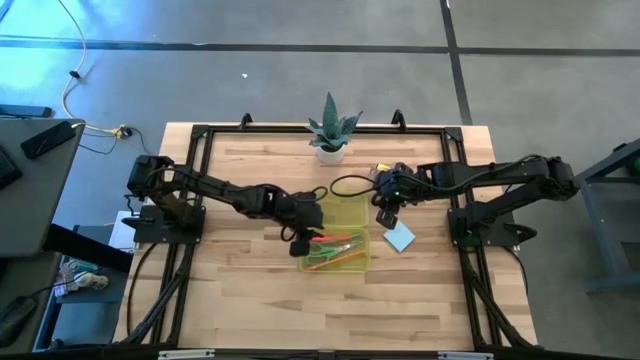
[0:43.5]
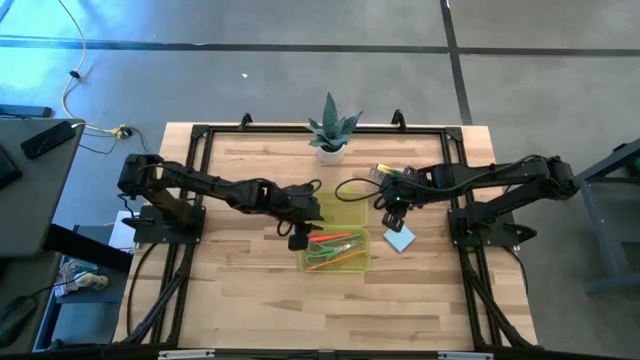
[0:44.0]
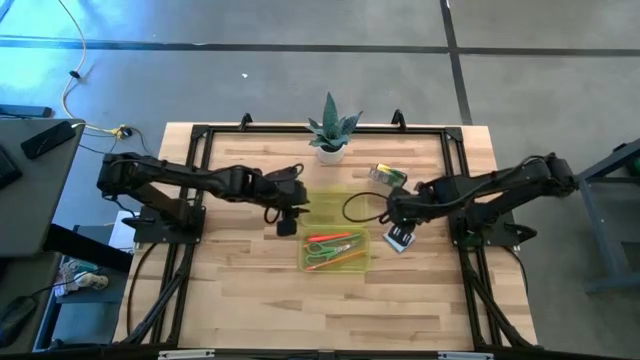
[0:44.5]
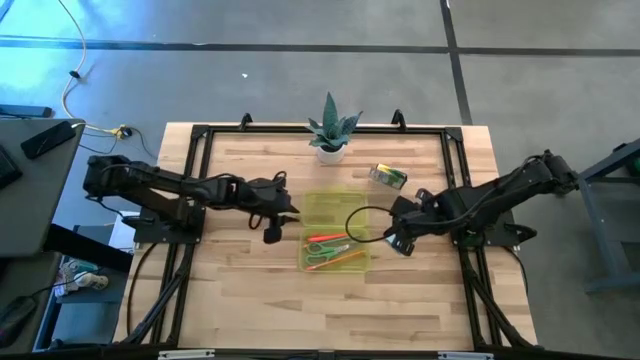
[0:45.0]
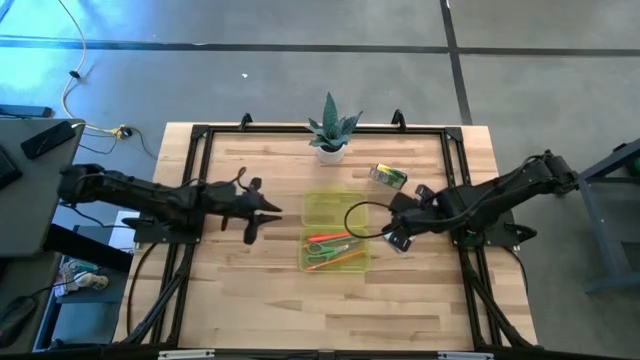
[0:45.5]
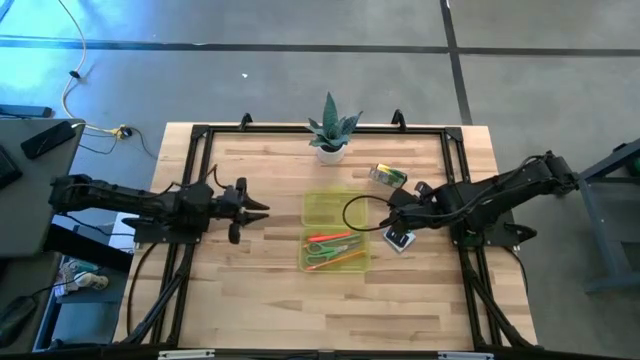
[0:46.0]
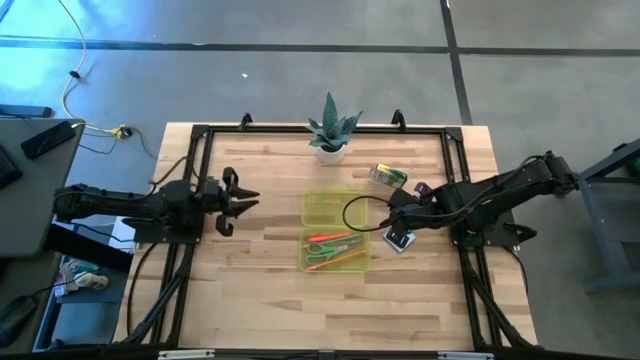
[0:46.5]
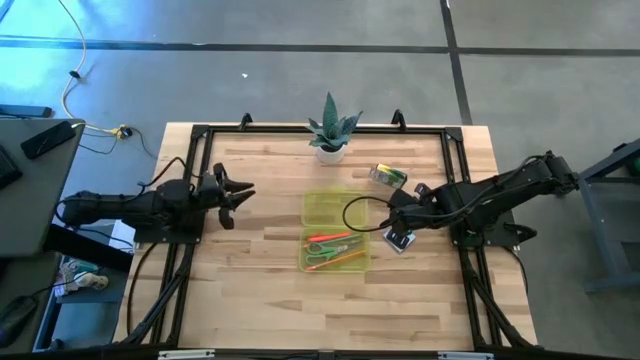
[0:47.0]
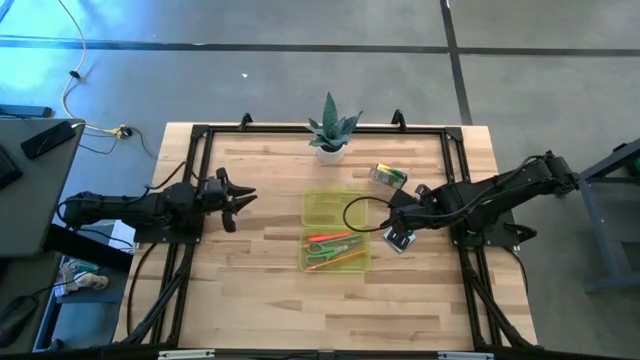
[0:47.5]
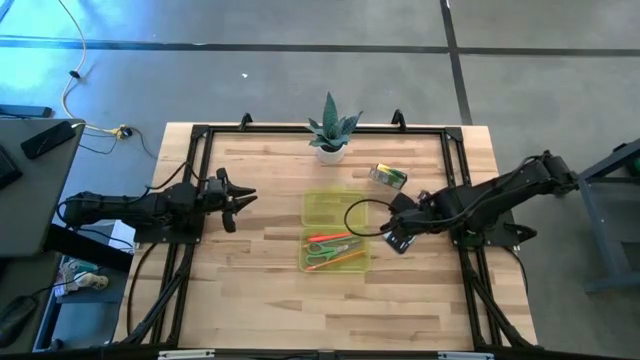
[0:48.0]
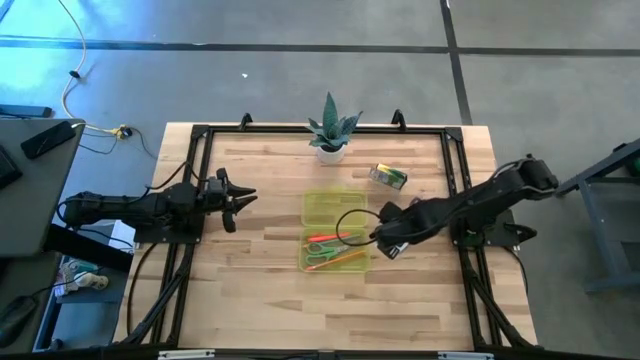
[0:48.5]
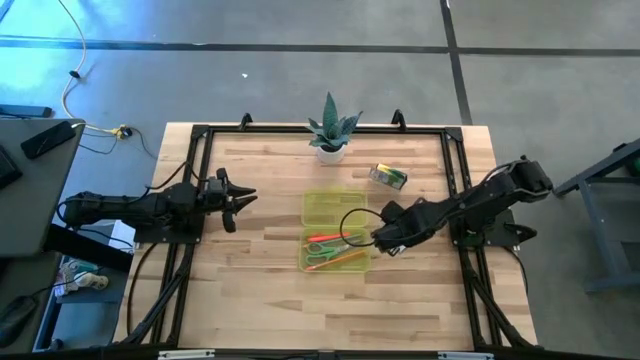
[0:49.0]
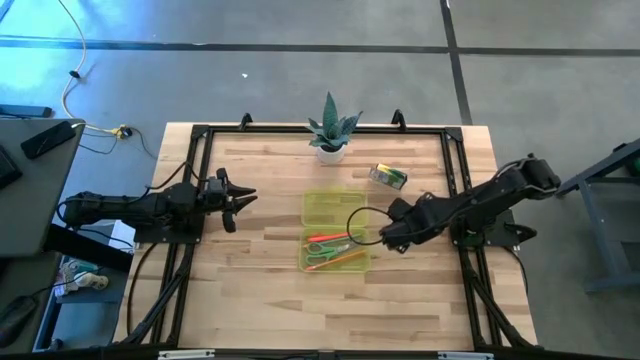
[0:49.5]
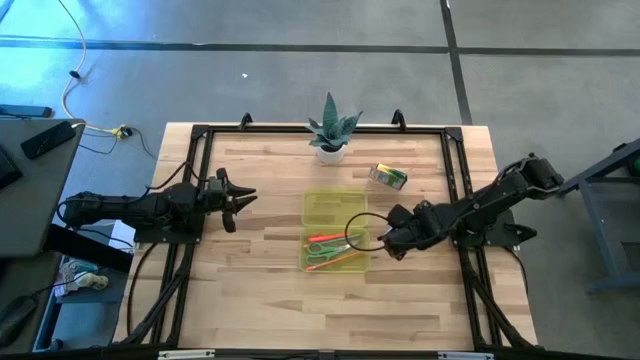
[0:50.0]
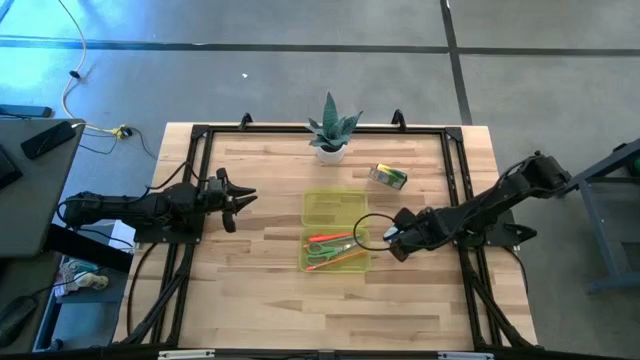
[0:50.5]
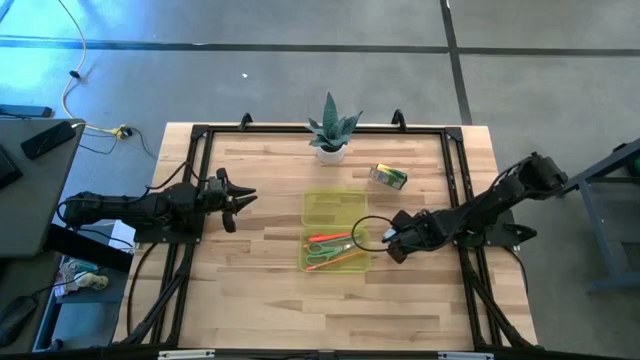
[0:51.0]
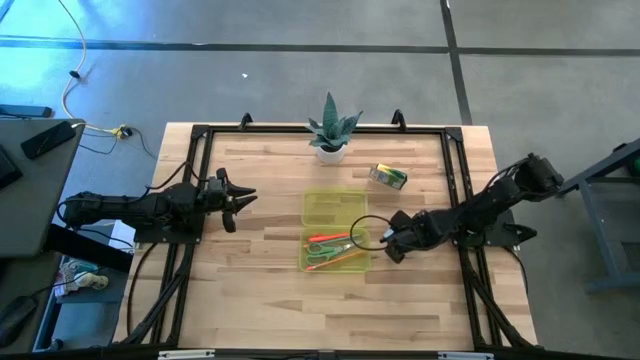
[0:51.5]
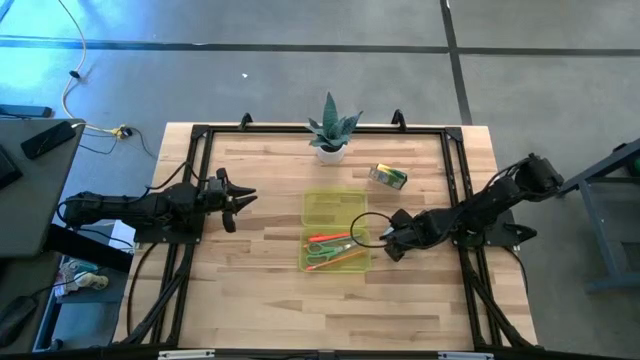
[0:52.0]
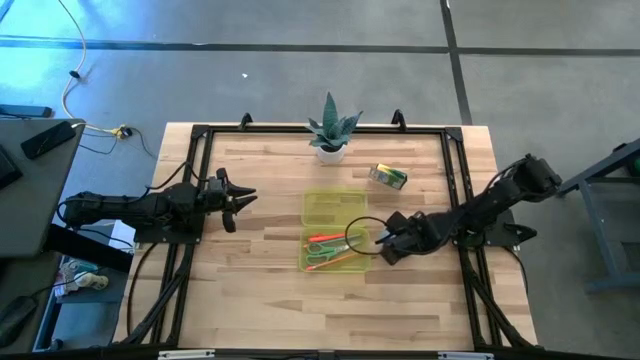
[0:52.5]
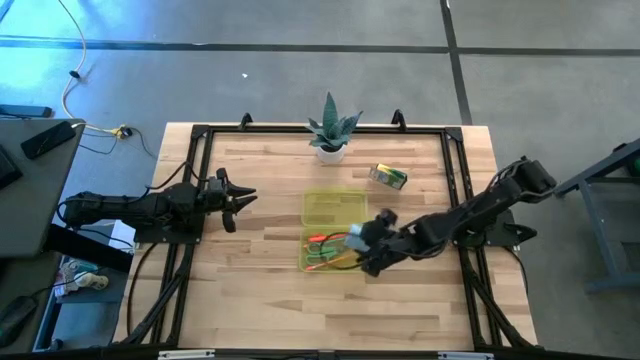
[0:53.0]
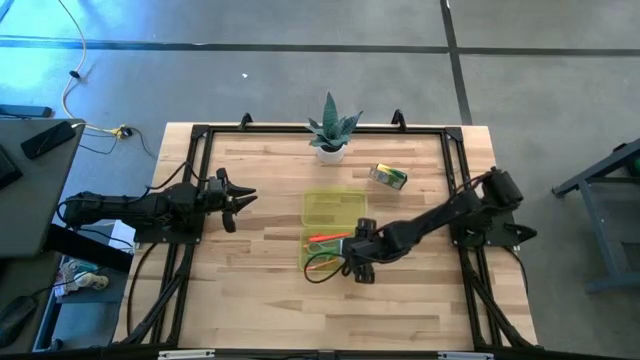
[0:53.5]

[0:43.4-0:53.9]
Task: Pack school essentials
Put the blue sticky note into the yellow supply box

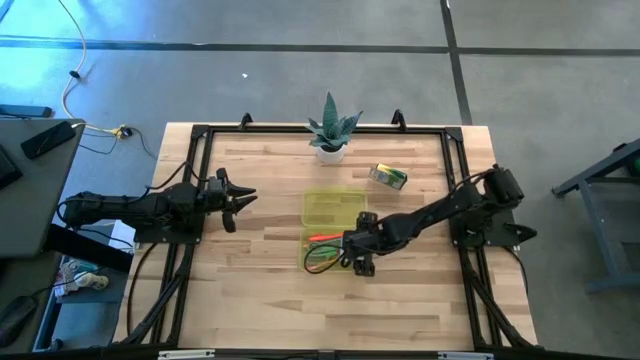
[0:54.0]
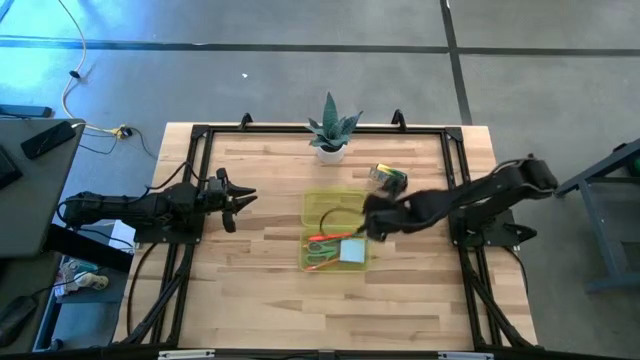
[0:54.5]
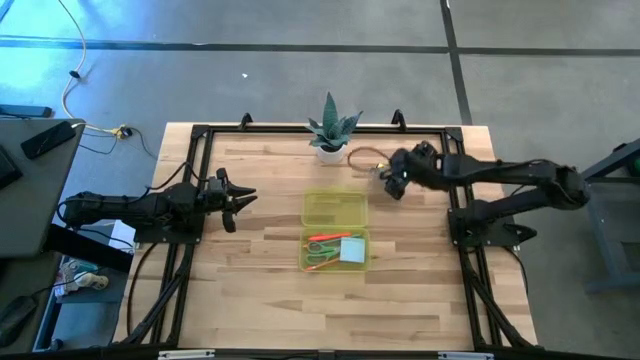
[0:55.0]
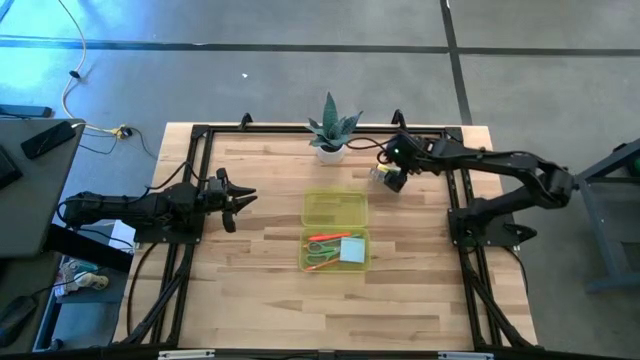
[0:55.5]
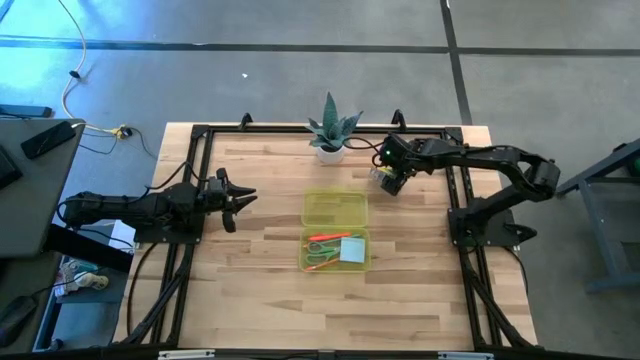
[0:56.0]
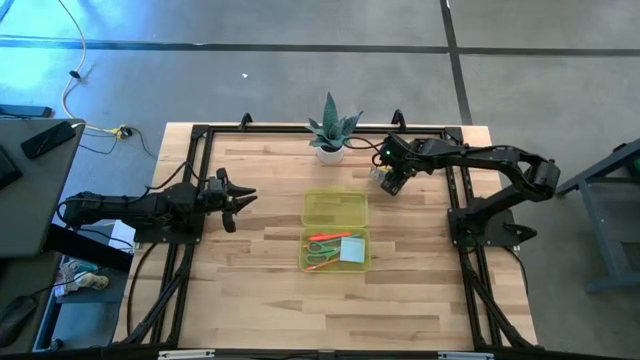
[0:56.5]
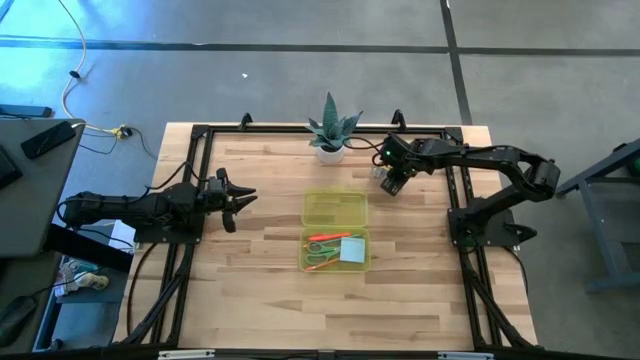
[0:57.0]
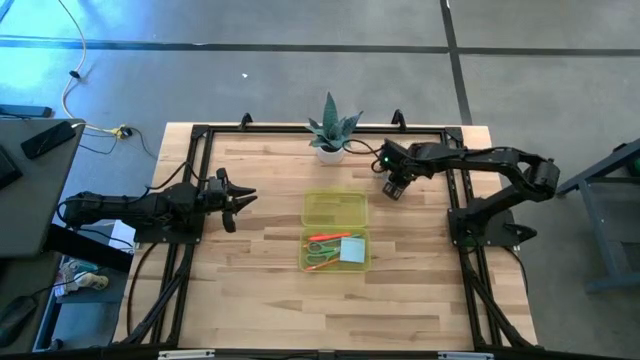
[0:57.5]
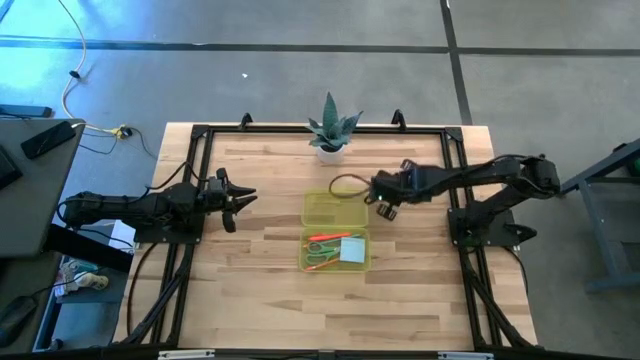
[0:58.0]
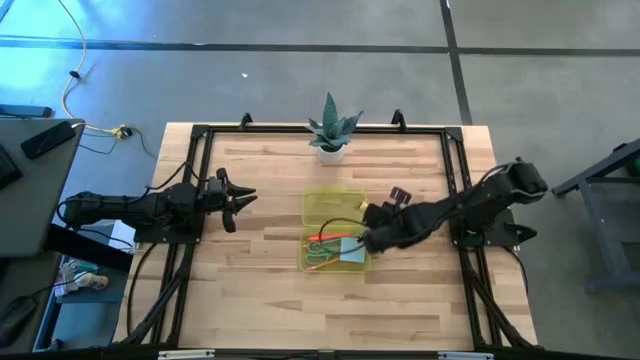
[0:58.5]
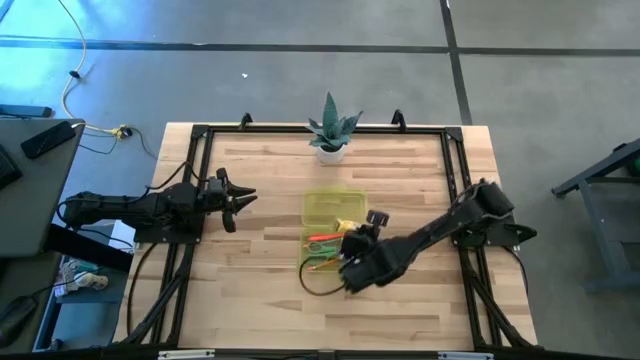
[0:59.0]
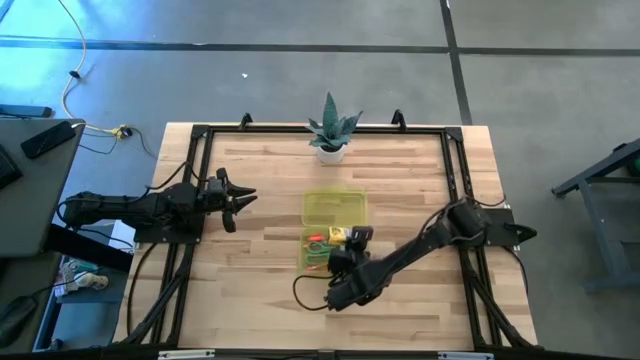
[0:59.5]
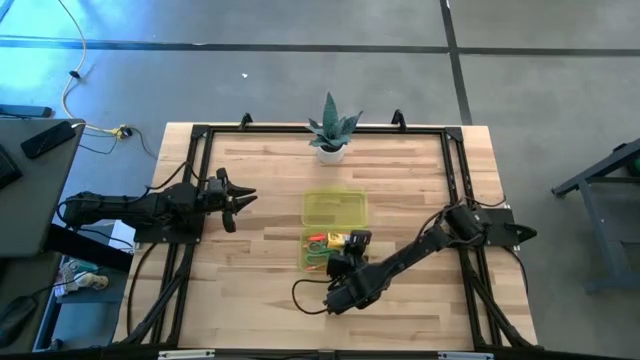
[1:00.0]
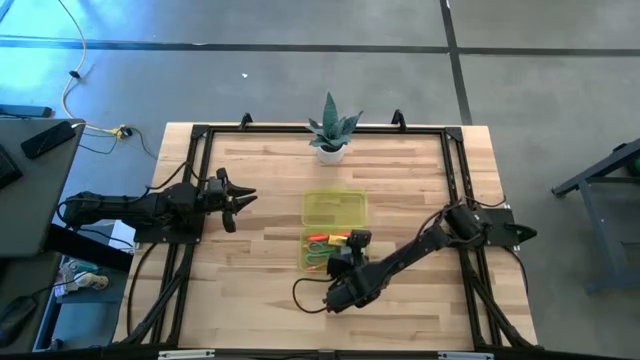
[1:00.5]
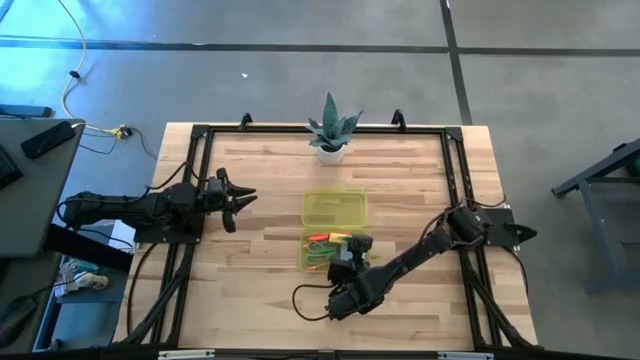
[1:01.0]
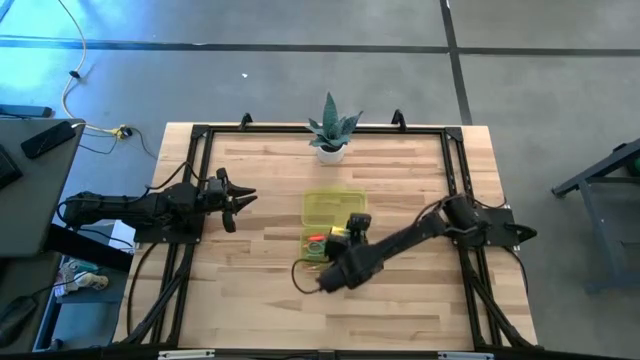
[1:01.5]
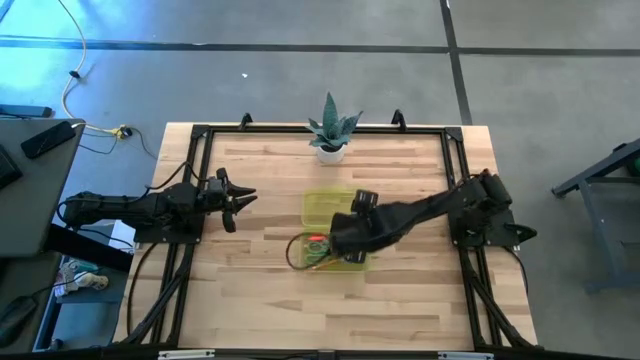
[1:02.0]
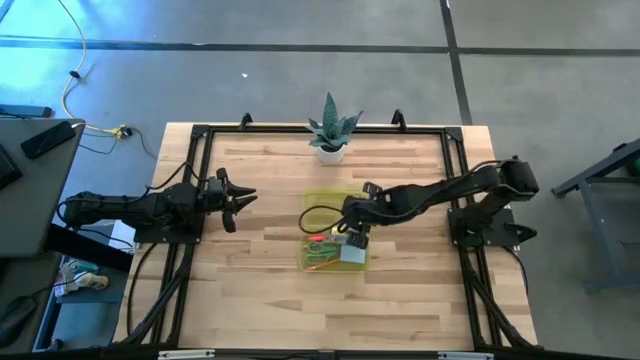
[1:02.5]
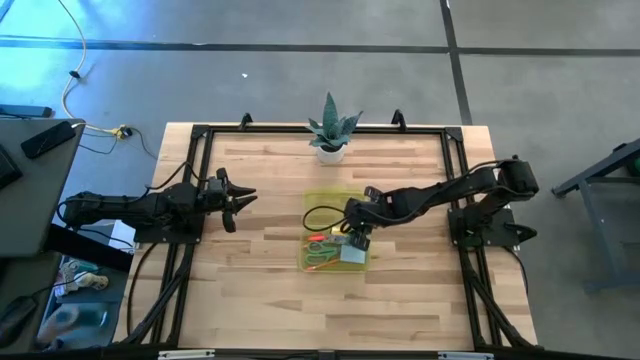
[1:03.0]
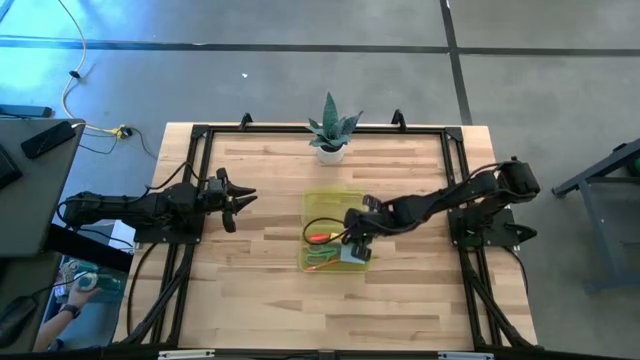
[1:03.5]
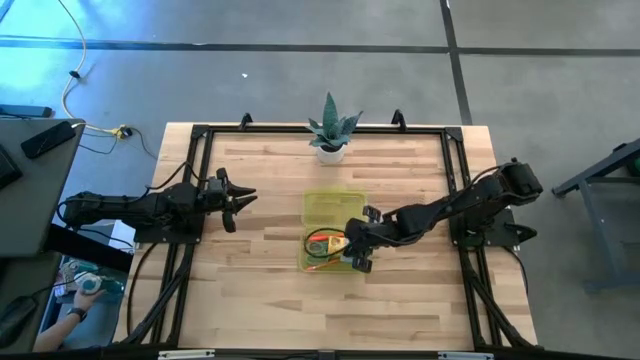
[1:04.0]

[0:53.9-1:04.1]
Put the yellow crayon box into the yellow supply box
